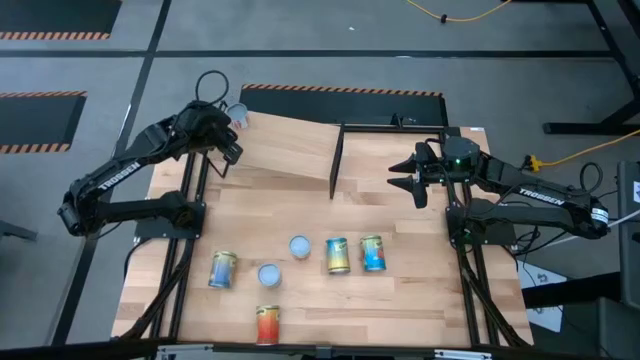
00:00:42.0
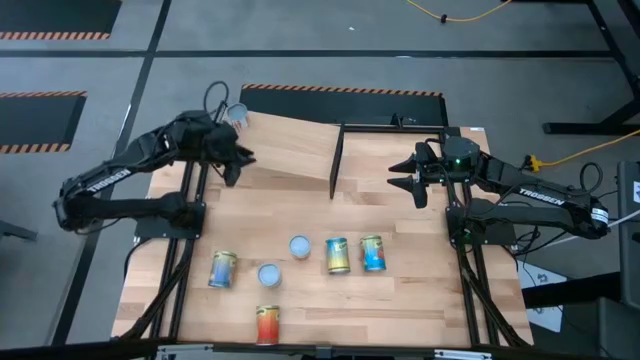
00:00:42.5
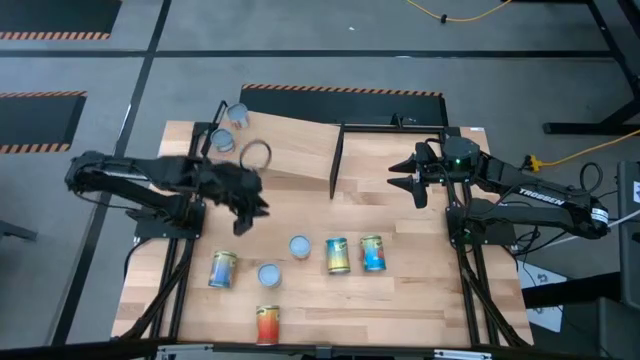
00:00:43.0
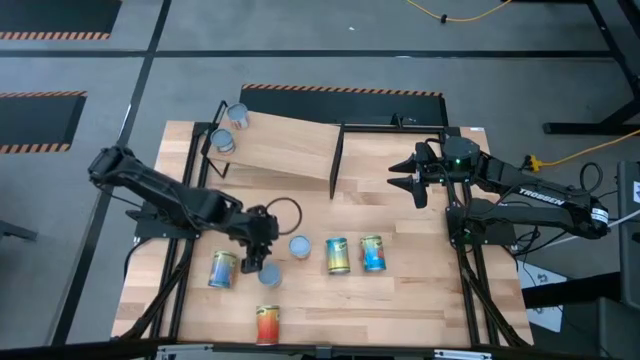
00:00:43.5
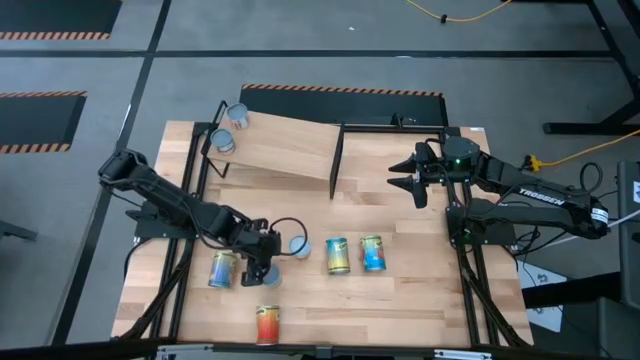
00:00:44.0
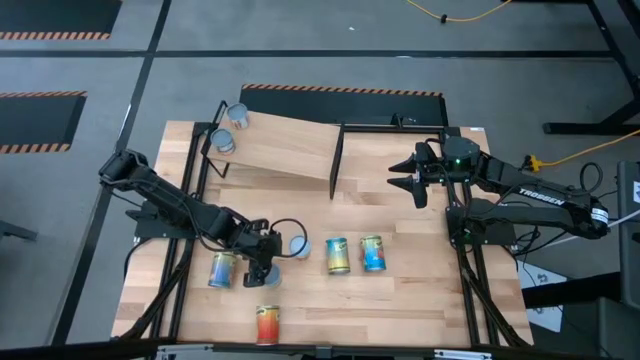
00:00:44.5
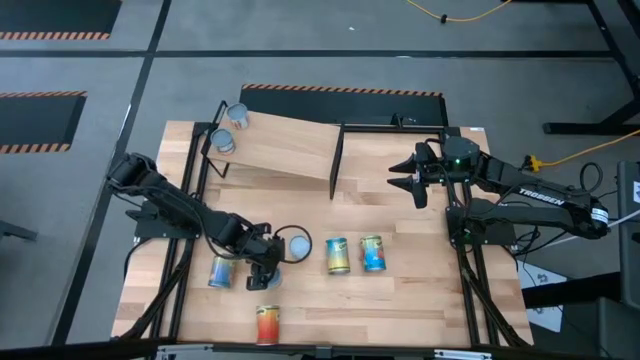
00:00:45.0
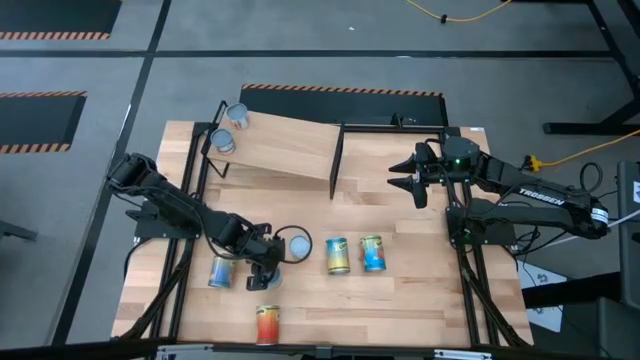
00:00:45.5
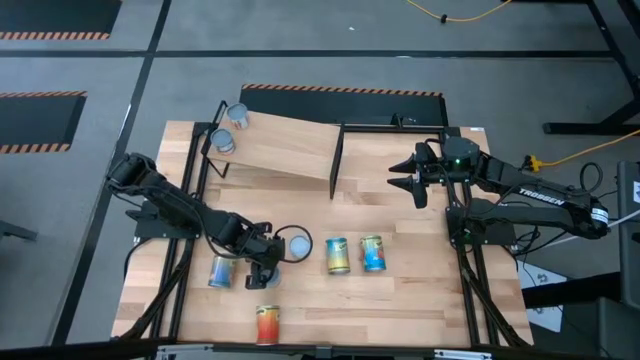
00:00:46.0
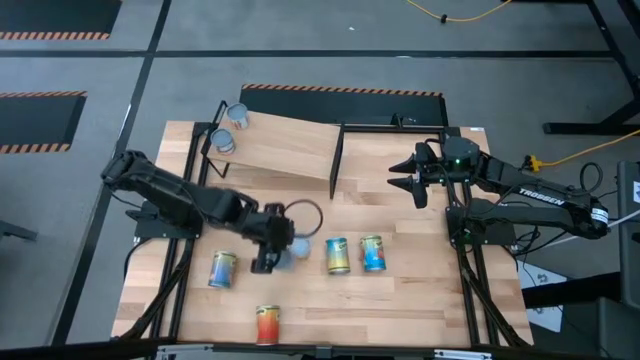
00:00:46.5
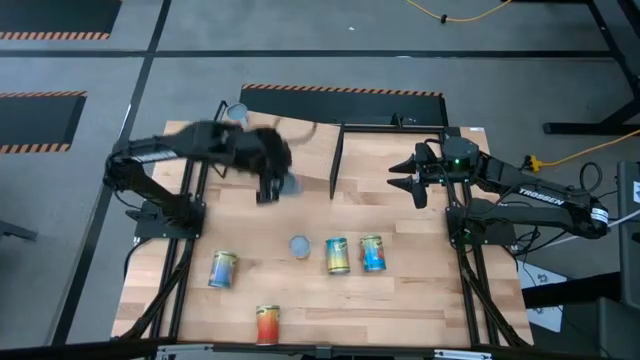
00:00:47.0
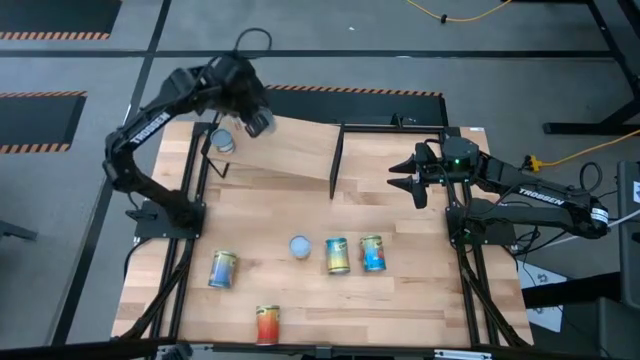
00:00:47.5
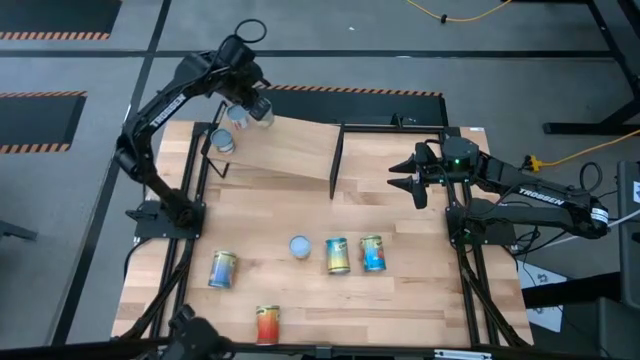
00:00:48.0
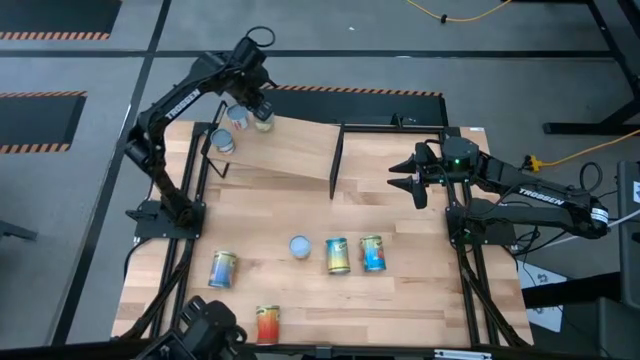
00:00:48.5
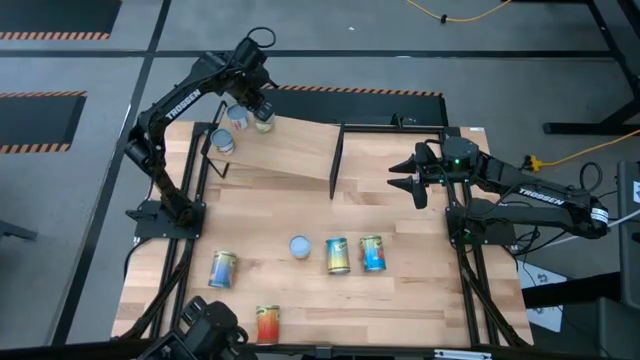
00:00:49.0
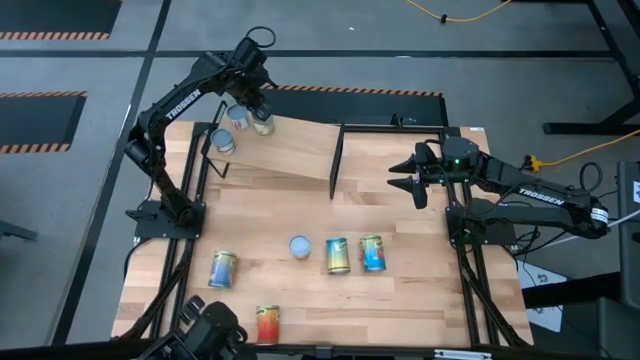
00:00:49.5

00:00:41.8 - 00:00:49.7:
Task: Pick and place cans onto a shelf
Put the canned chicken on the shelf

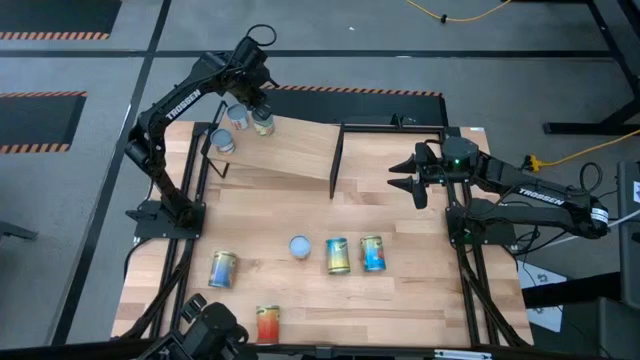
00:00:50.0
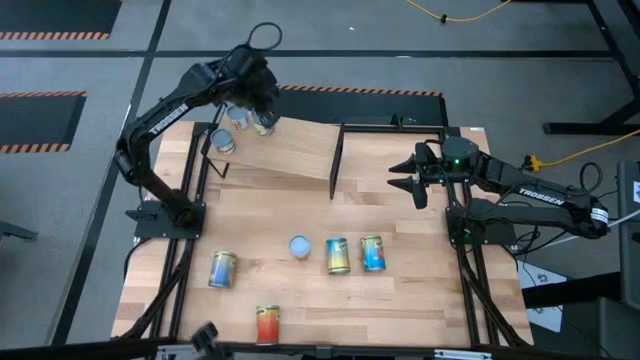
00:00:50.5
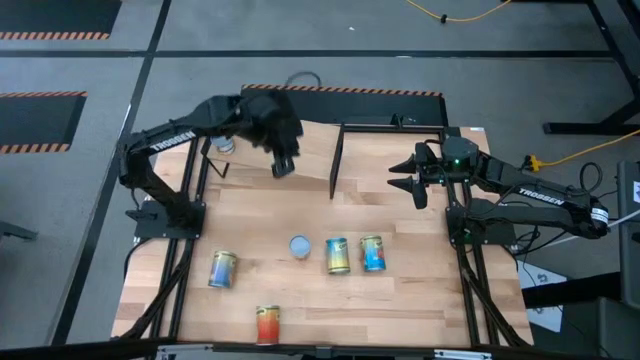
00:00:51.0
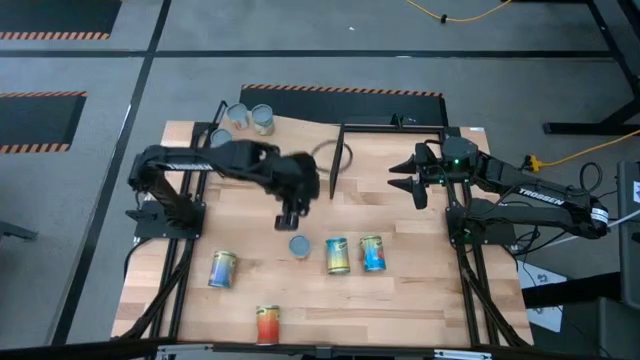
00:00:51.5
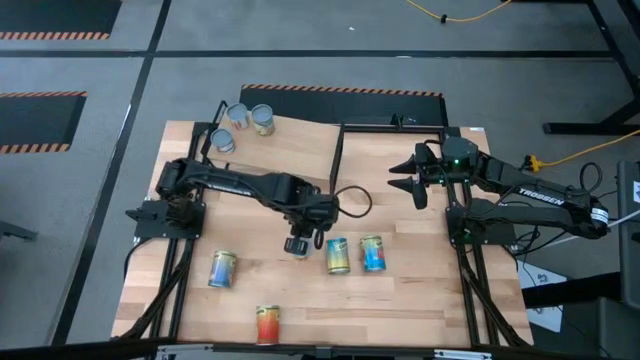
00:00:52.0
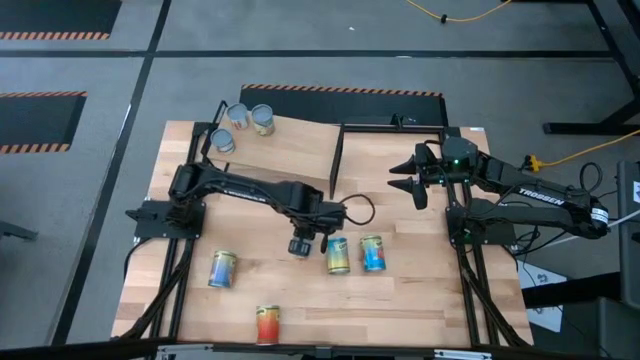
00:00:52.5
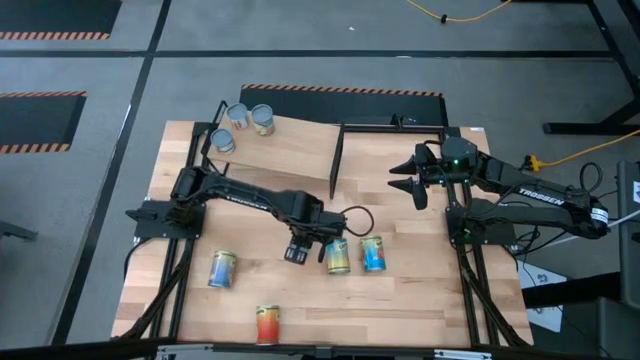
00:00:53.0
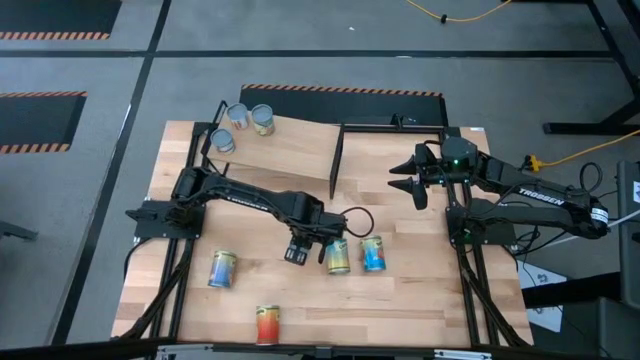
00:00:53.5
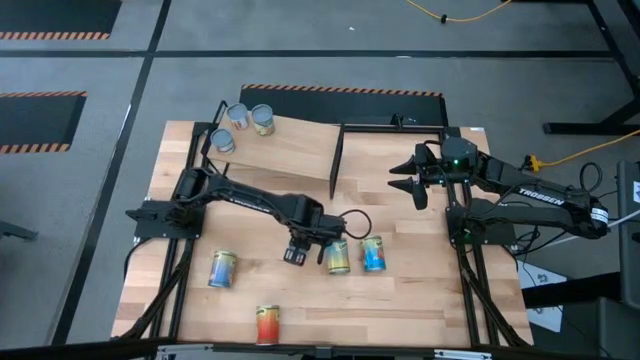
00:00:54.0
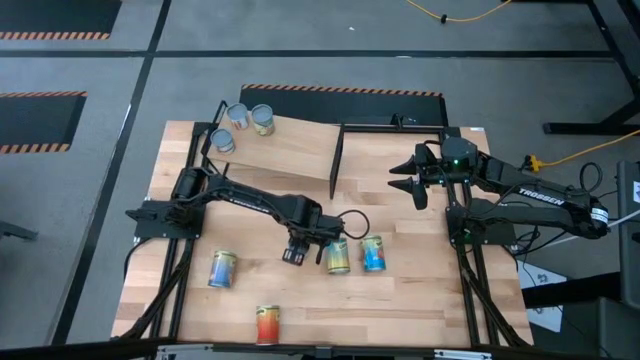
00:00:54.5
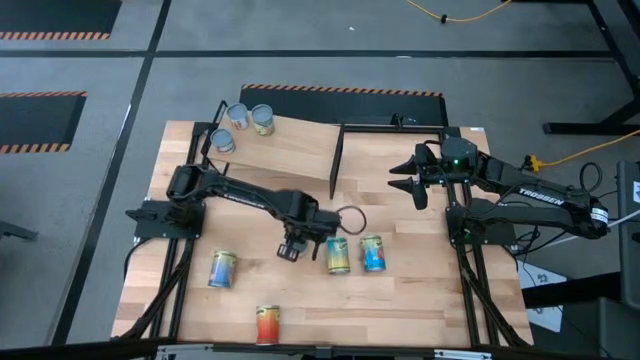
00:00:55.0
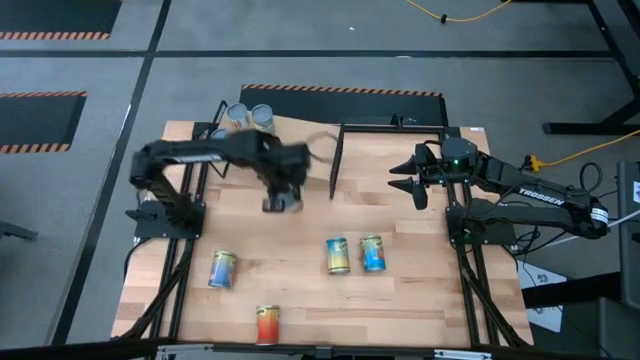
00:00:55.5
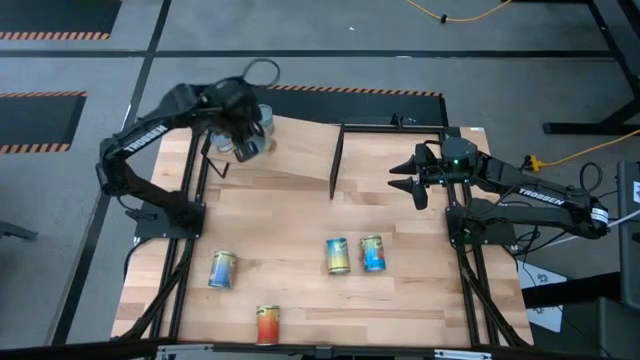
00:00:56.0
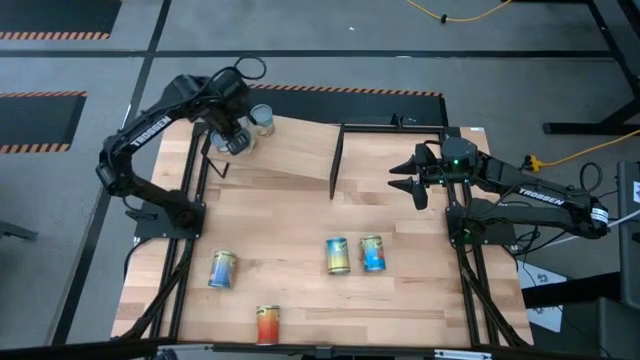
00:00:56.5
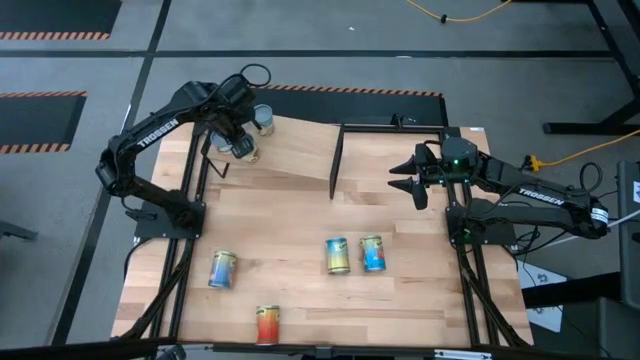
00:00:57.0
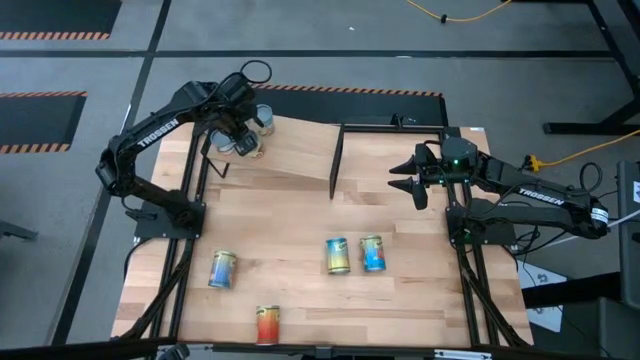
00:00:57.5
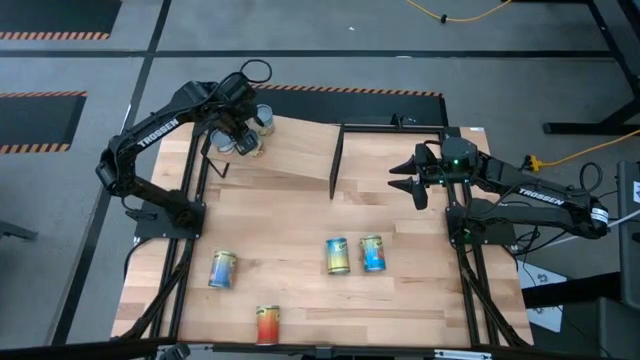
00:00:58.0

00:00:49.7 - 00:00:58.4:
Put the canned spaghetti on the shelf aligned with the other canned chicken

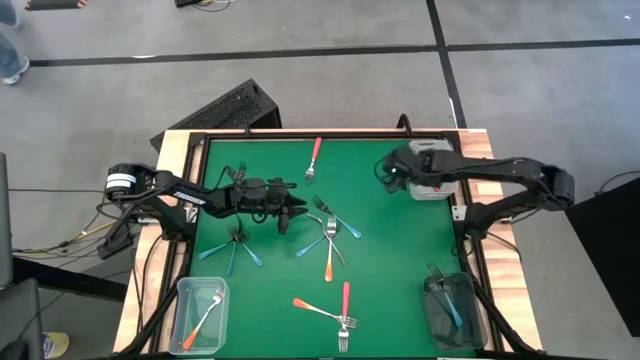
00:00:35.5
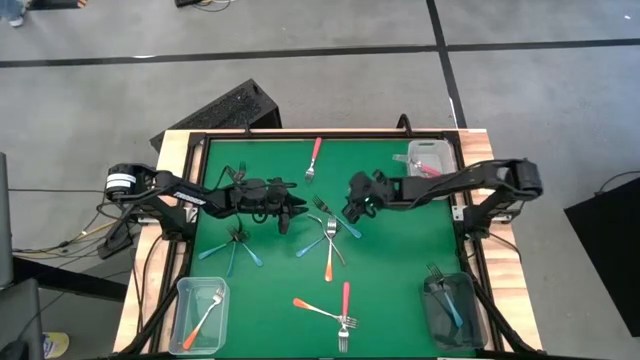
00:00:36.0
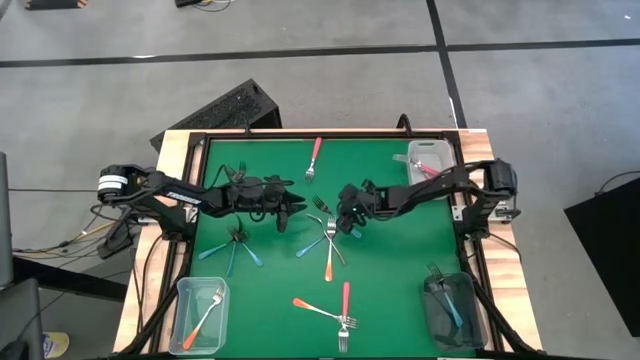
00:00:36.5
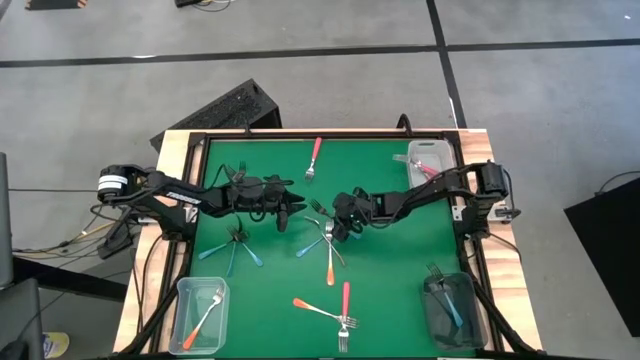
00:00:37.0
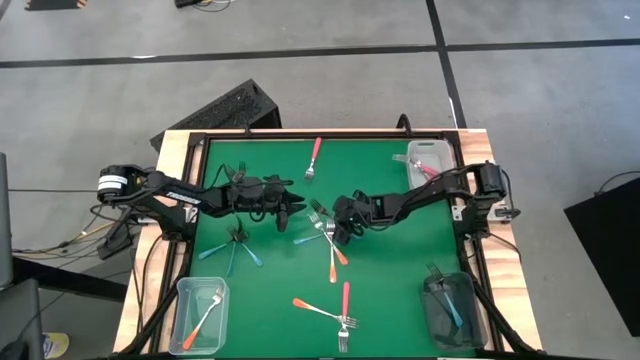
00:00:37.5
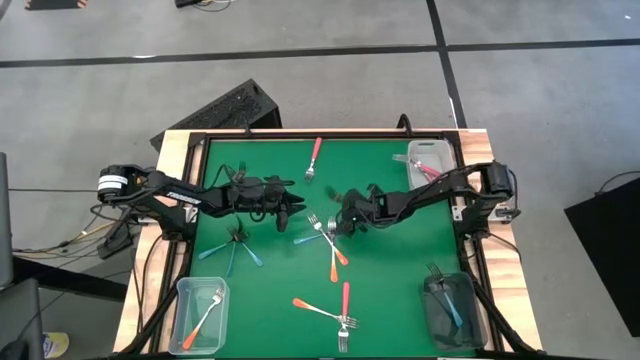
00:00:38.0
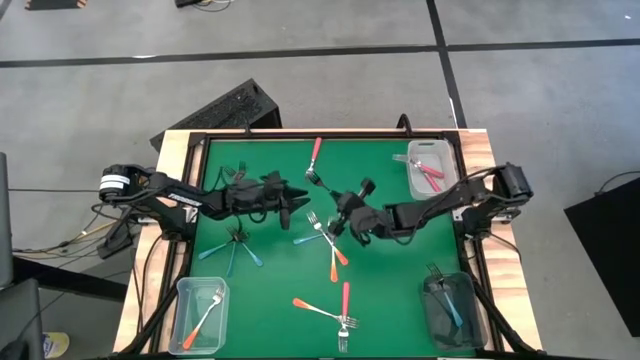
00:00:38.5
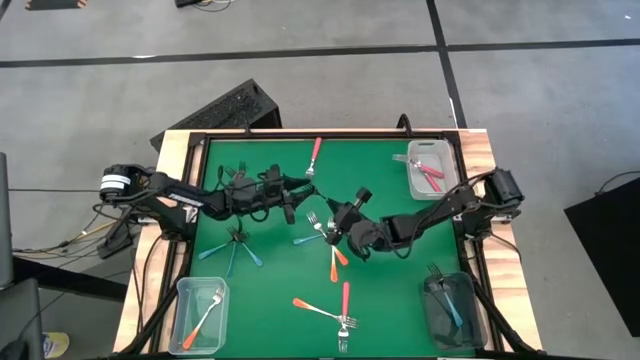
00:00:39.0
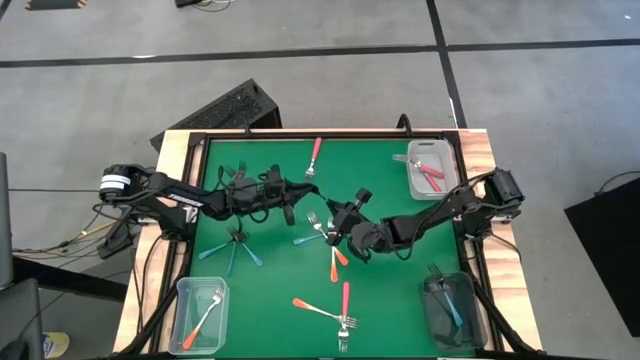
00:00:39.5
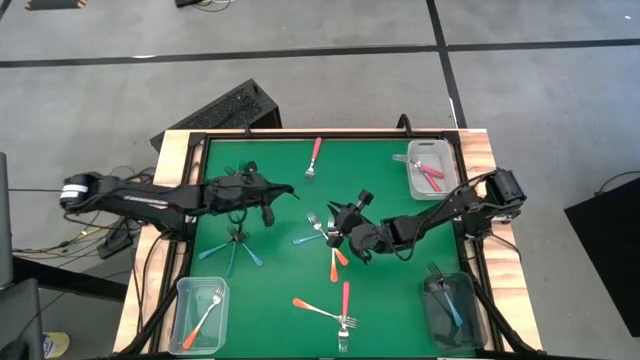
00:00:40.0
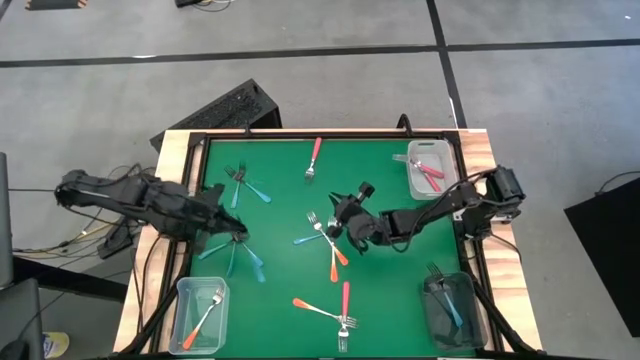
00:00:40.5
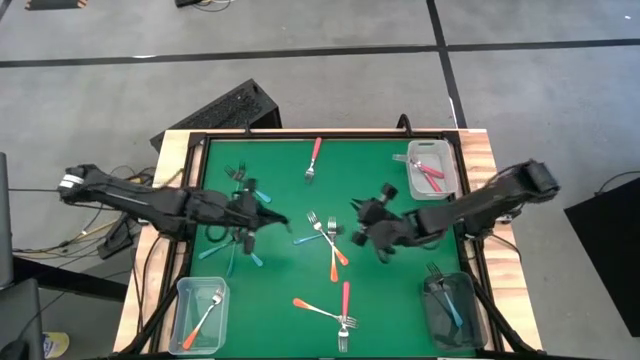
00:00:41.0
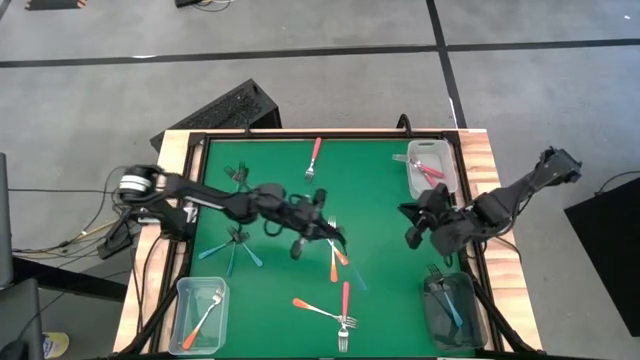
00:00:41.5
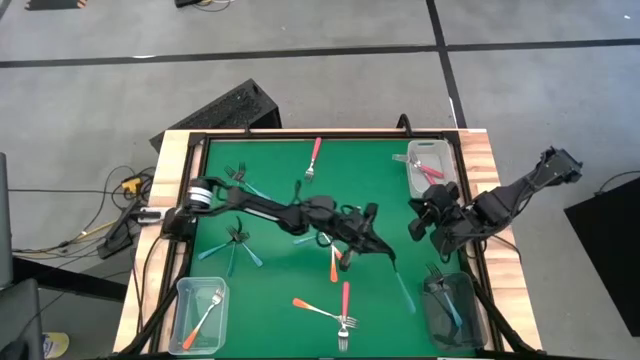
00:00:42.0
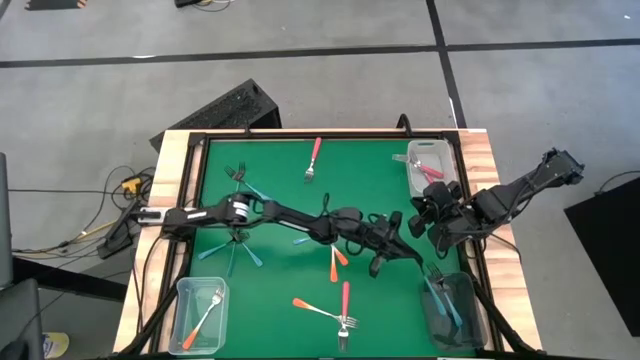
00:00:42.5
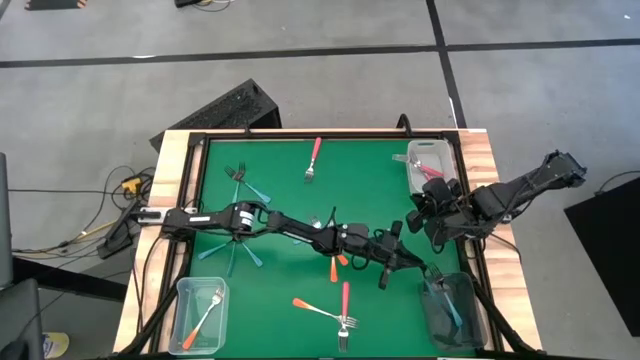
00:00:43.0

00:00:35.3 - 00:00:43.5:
Task: Sort silverware by color (type)
Put the blue fork into the black bin
